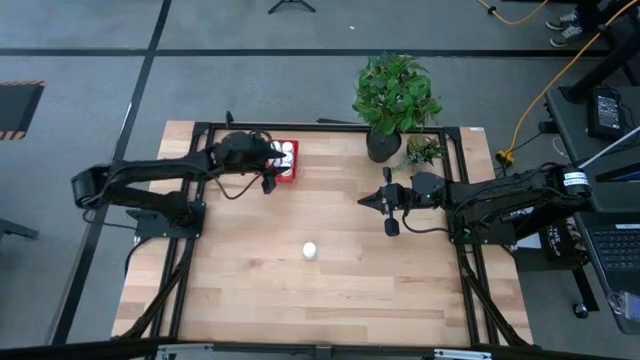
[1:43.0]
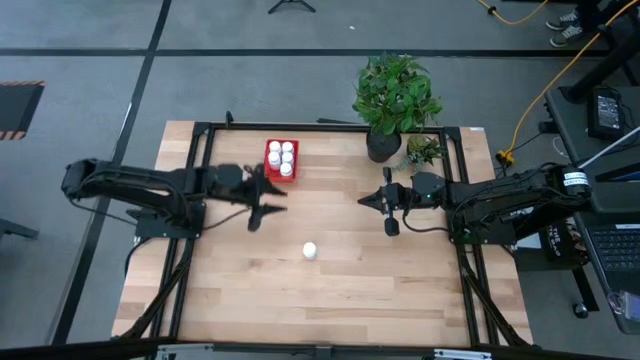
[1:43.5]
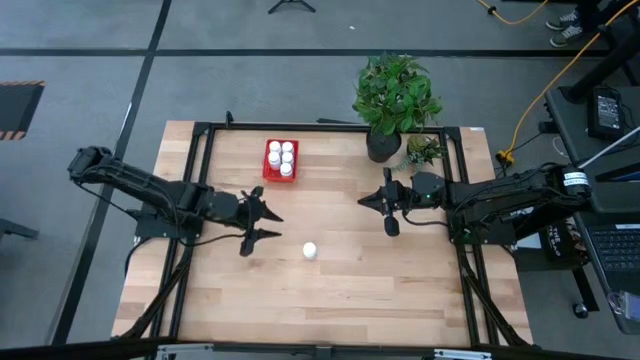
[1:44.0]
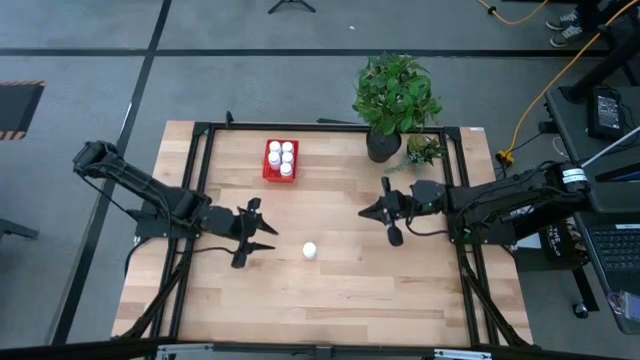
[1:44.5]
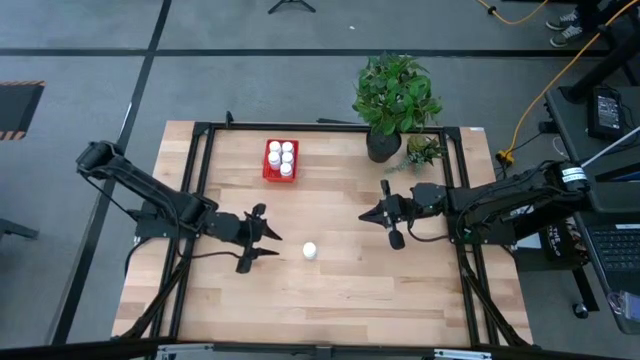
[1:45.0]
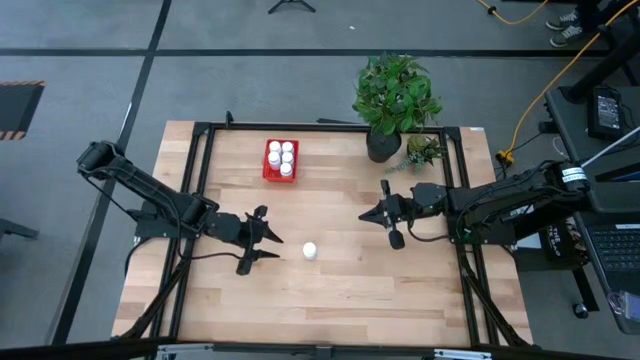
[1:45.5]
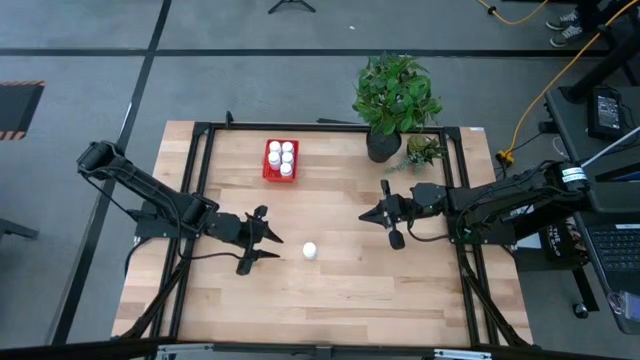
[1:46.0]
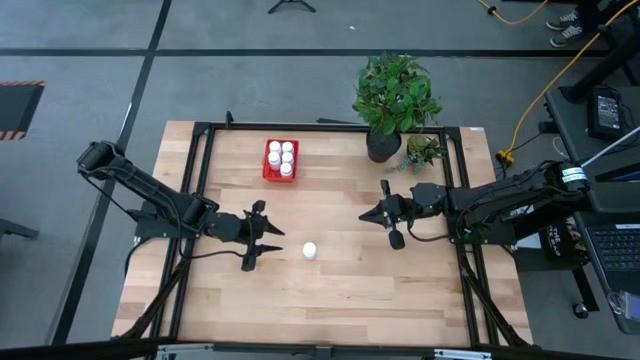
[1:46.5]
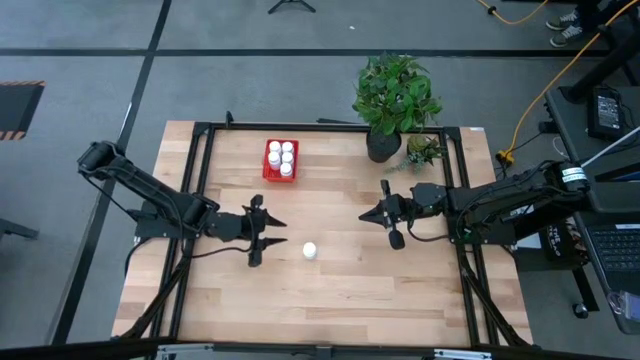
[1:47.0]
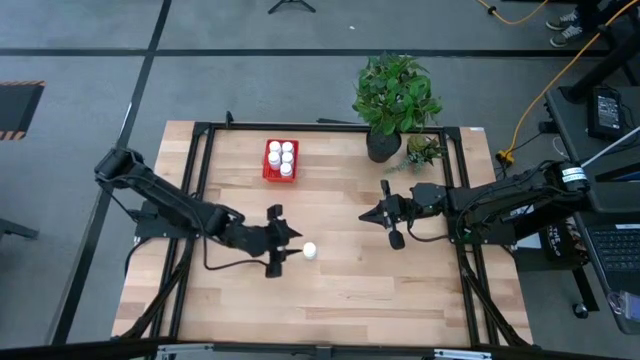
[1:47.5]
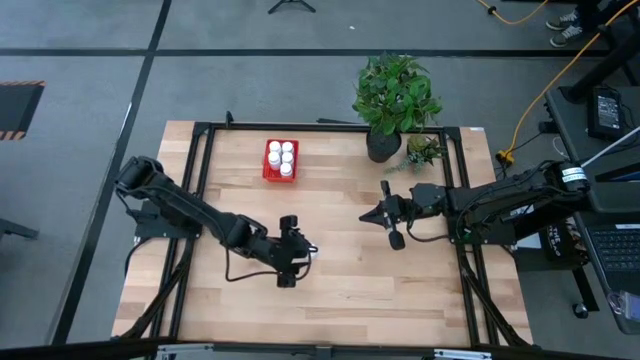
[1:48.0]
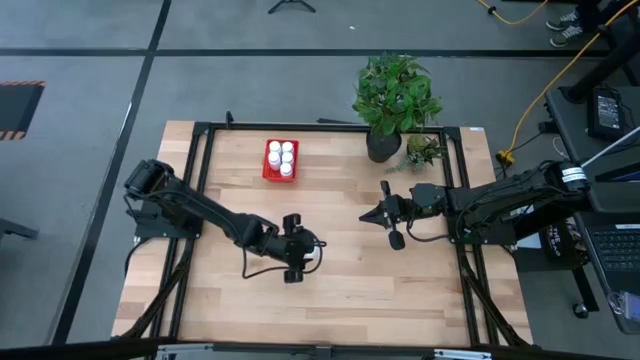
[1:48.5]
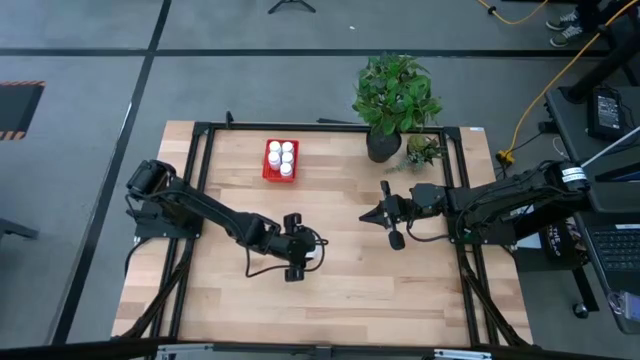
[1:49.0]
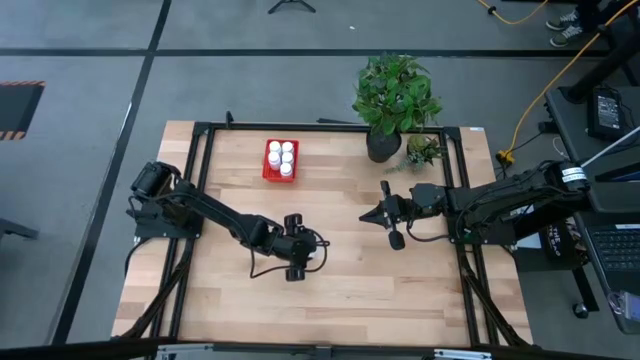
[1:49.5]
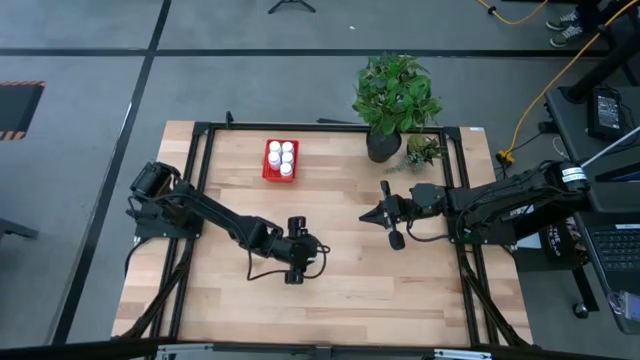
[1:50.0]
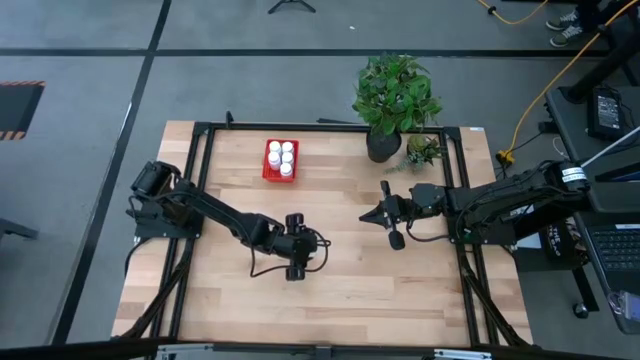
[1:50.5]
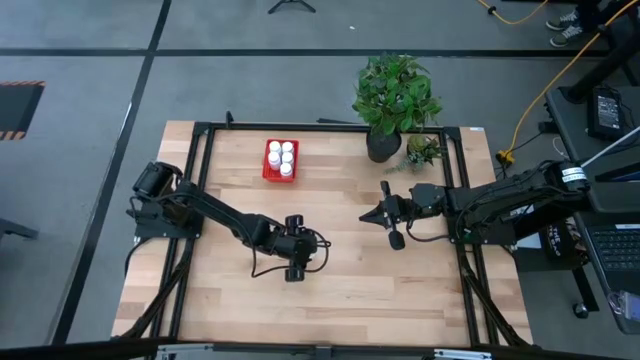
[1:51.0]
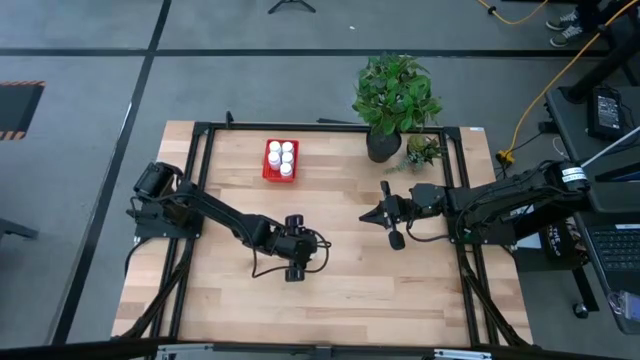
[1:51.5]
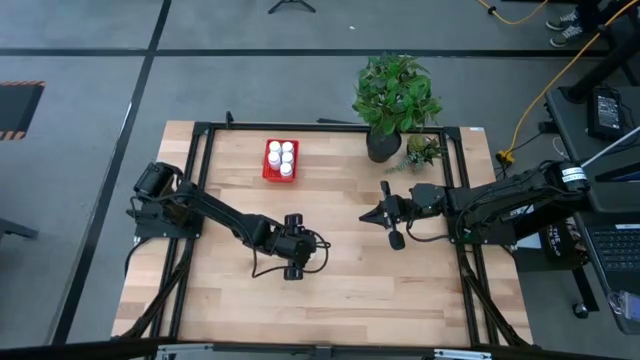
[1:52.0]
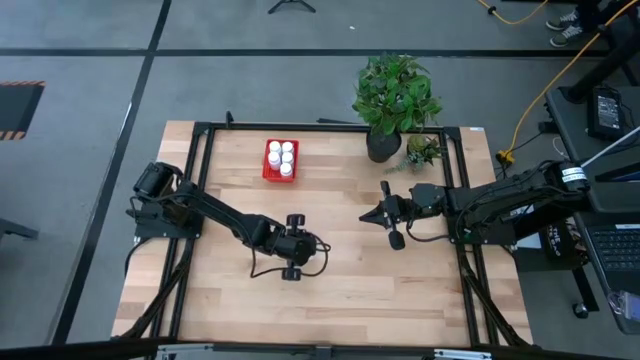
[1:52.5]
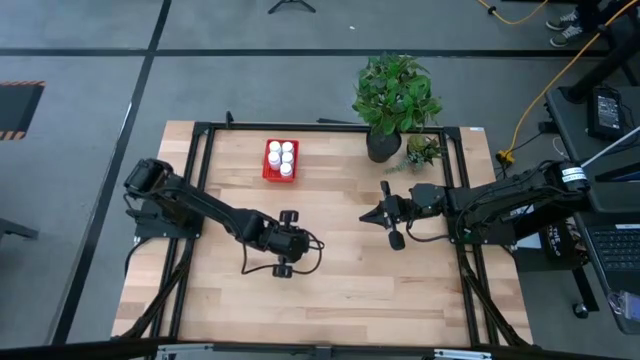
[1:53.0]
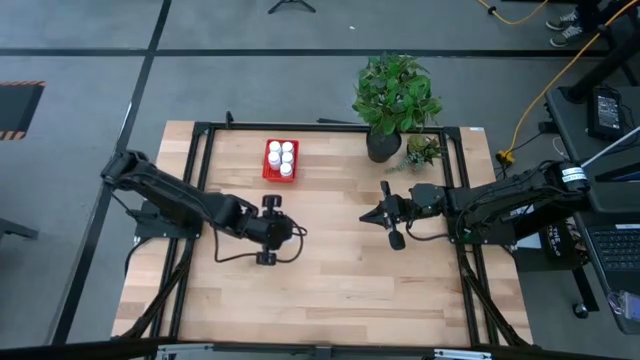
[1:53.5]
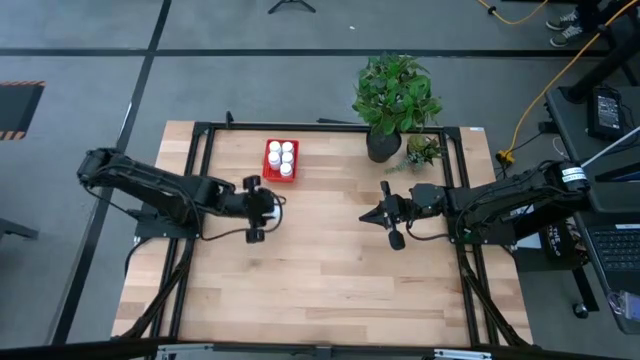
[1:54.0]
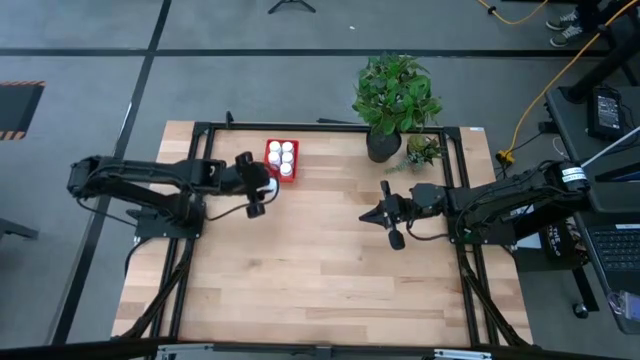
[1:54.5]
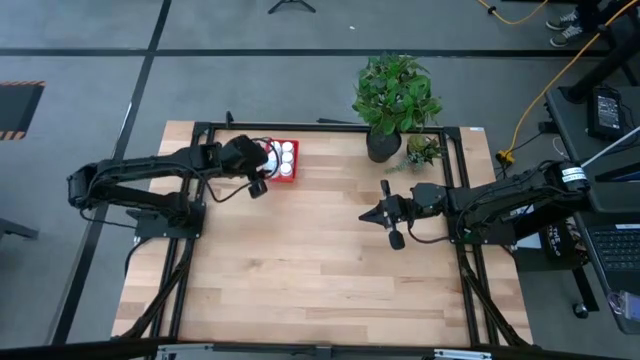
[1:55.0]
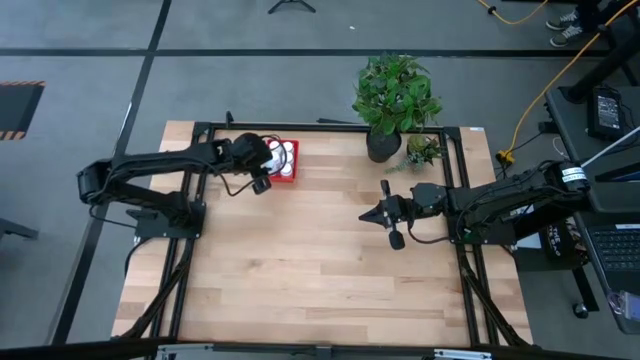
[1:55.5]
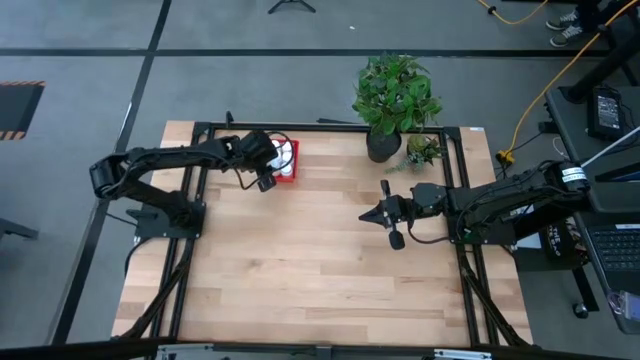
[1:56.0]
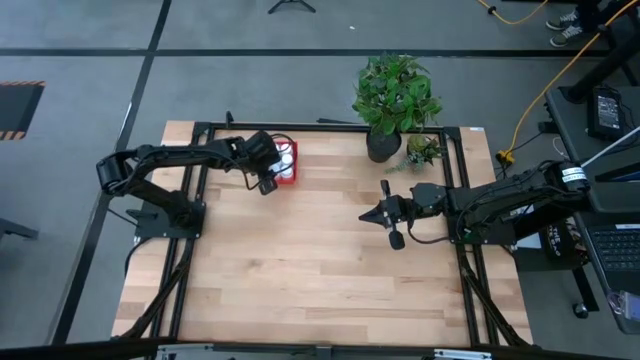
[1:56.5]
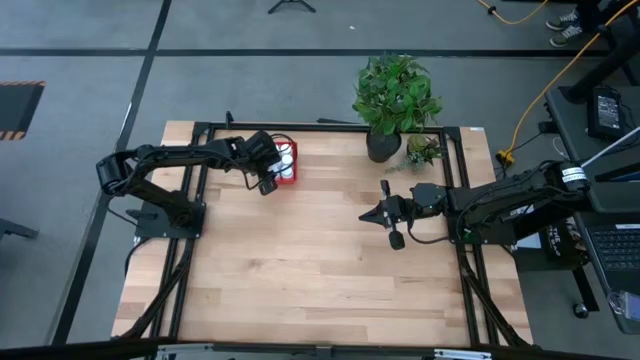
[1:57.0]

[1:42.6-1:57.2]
Task: Pick and place pill bottles into a basket
Put the white pill bottle into the red bin

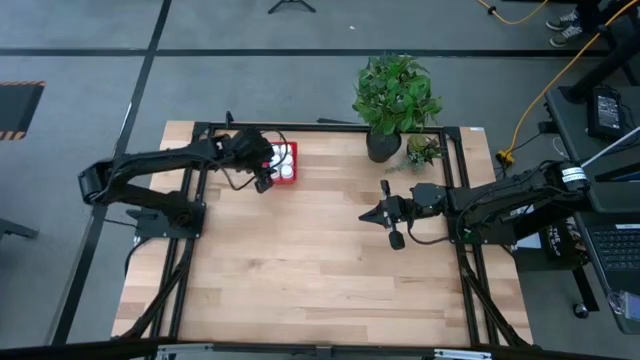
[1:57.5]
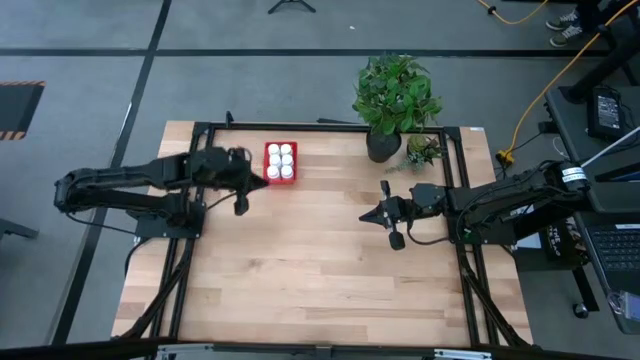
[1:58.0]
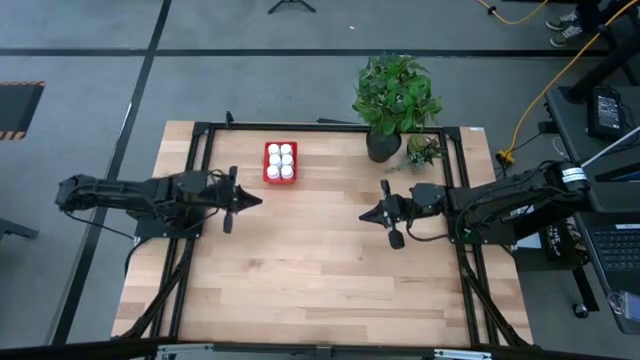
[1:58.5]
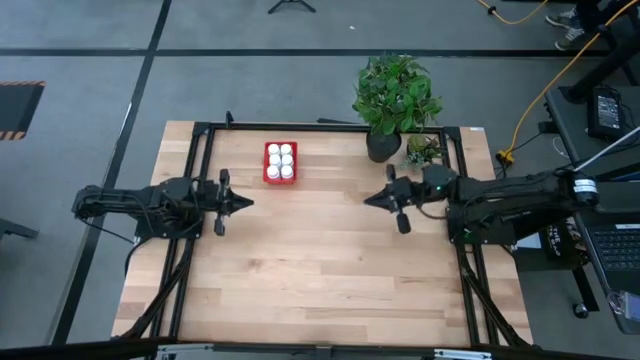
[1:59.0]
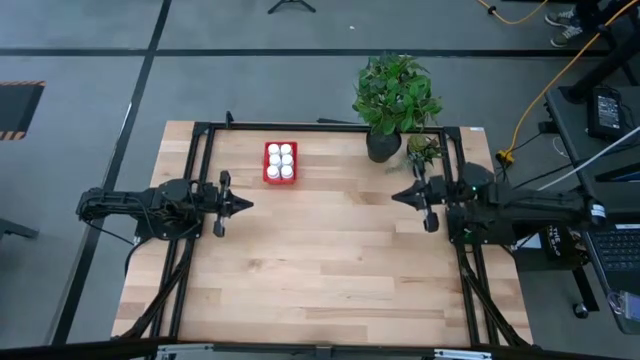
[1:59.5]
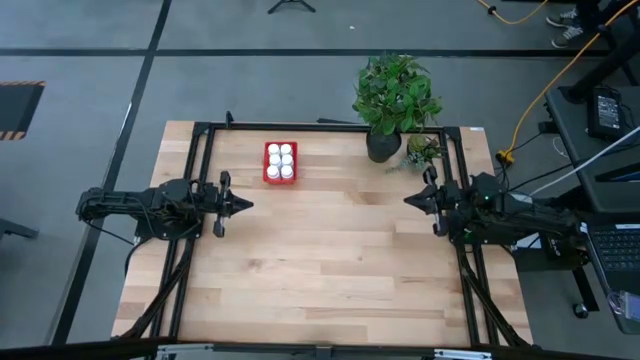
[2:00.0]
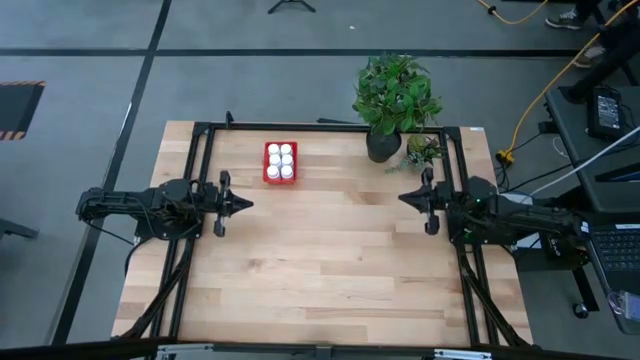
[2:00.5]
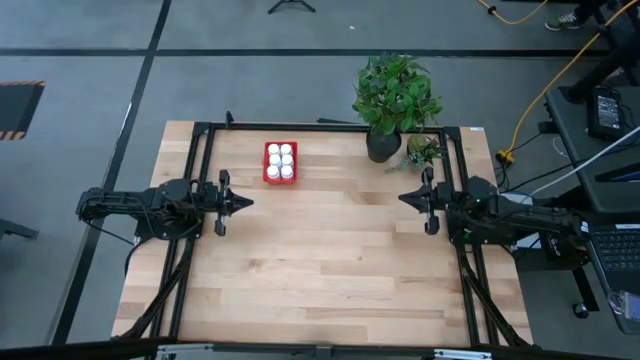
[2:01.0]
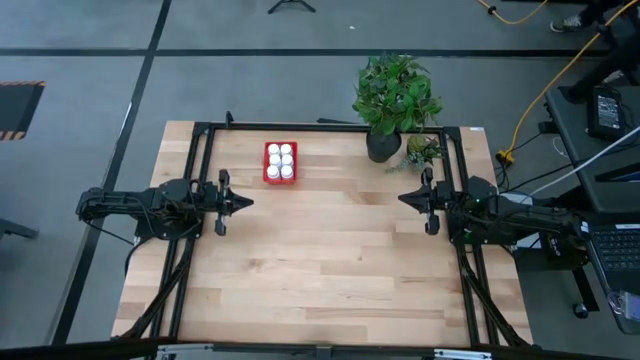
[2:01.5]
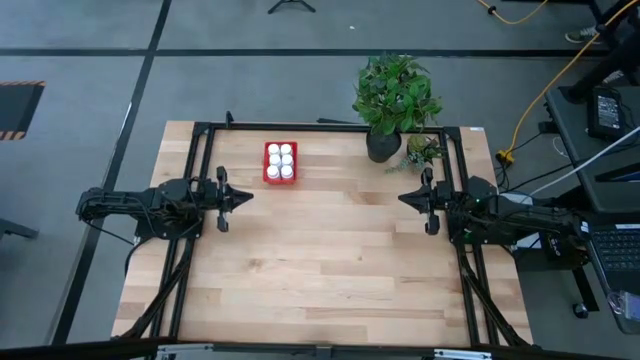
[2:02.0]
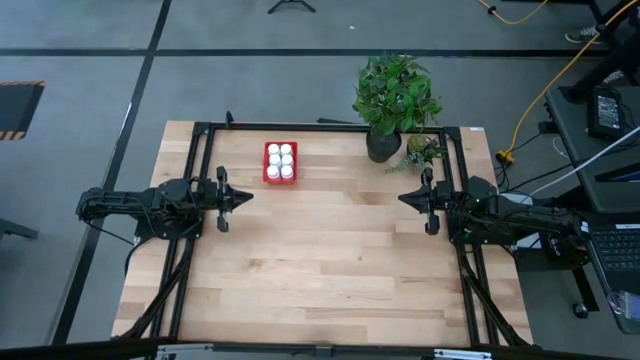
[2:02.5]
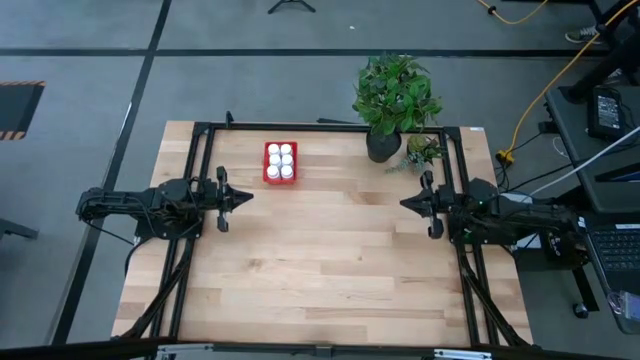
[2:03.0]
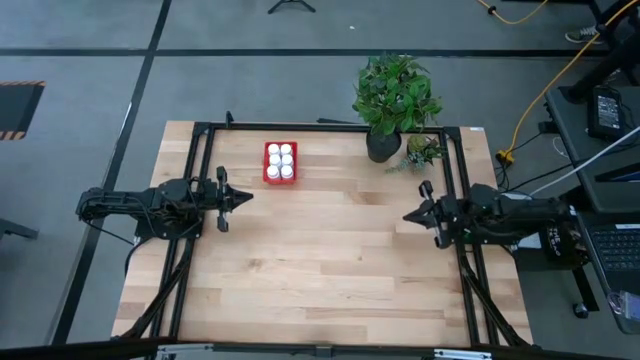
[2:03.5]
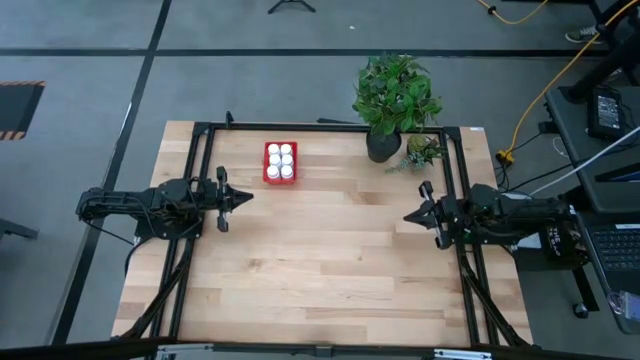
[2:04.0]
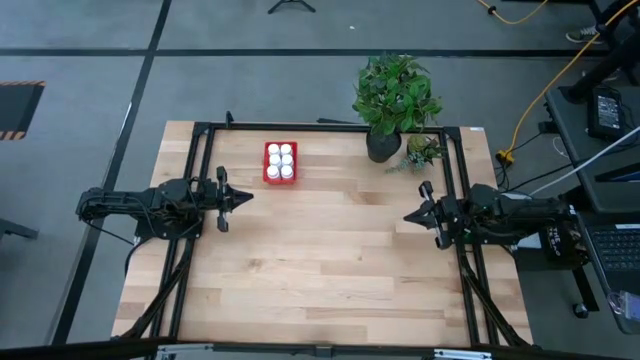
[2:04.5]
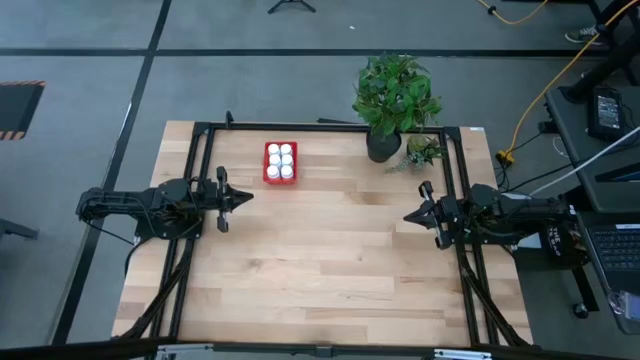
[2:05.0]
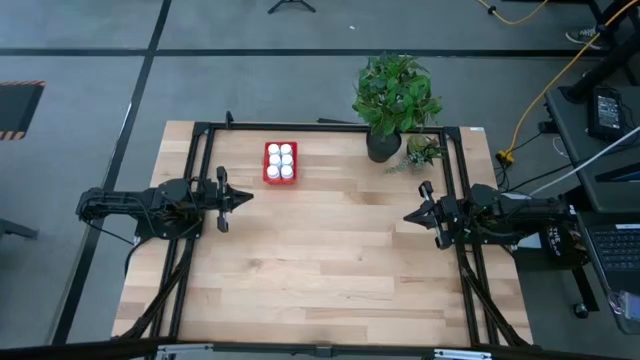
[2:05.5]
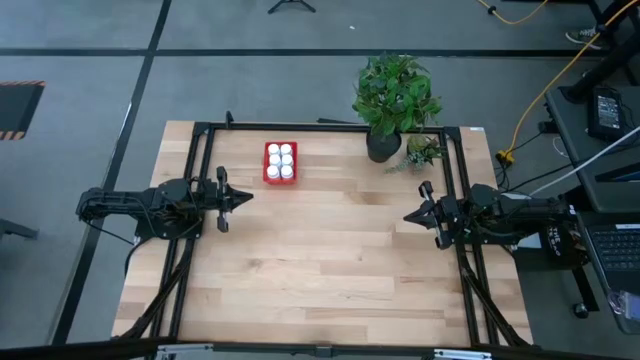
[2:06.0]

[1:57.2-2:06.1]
Return to Home Position
